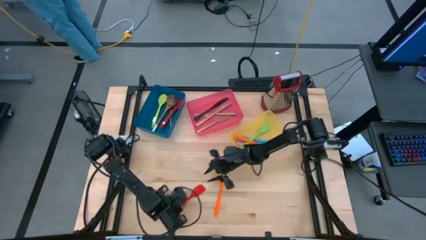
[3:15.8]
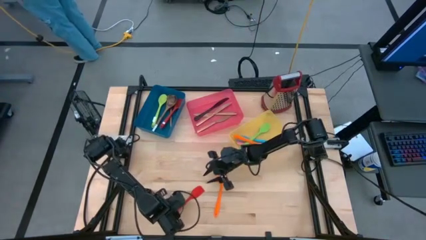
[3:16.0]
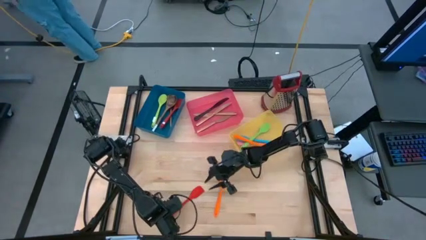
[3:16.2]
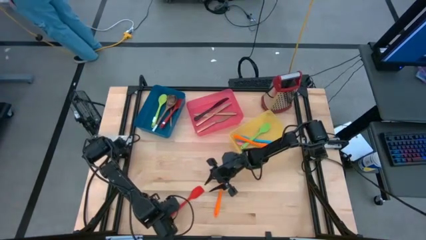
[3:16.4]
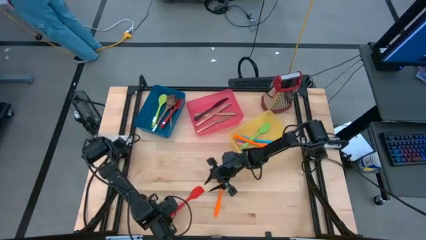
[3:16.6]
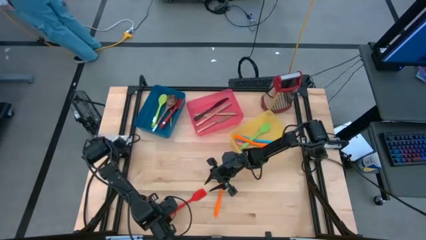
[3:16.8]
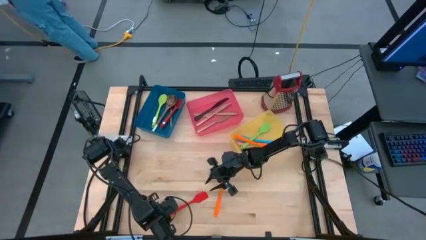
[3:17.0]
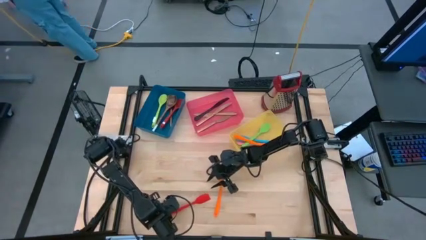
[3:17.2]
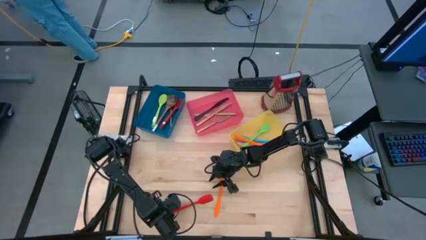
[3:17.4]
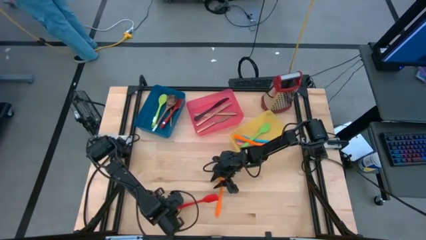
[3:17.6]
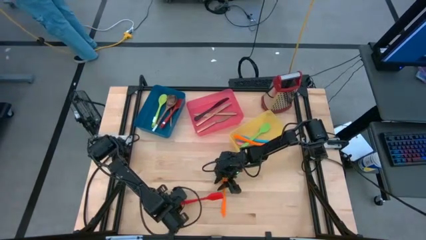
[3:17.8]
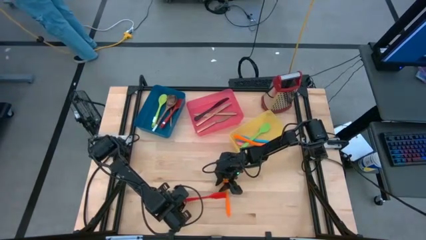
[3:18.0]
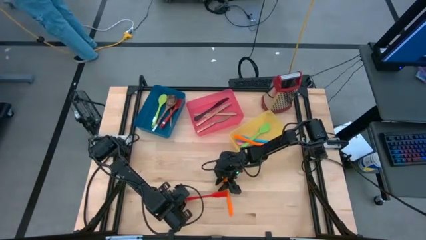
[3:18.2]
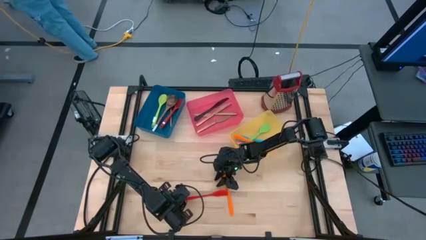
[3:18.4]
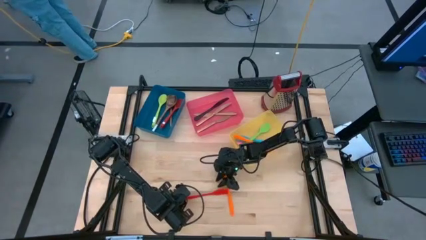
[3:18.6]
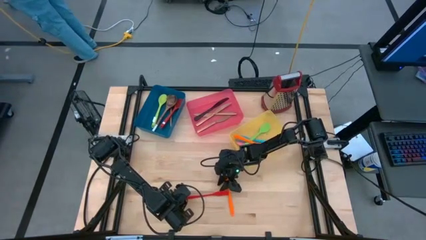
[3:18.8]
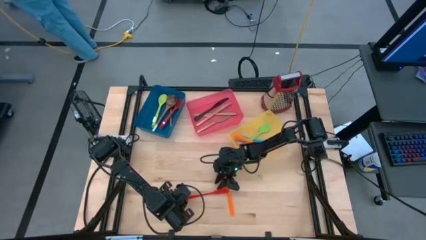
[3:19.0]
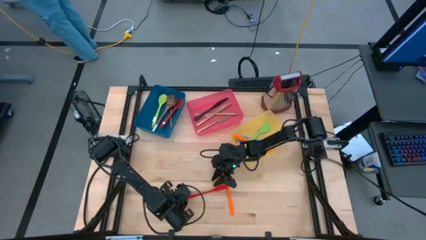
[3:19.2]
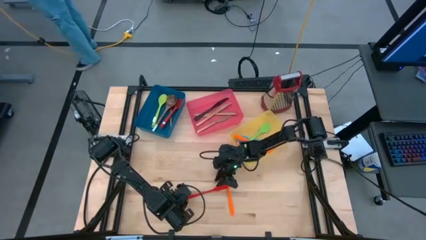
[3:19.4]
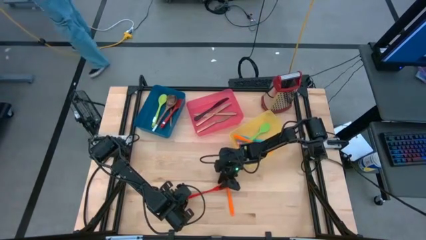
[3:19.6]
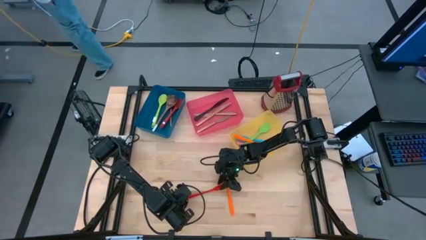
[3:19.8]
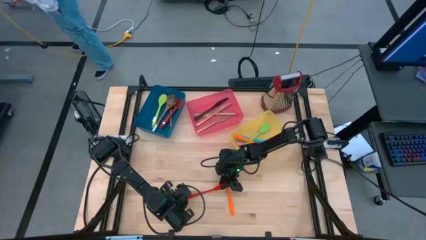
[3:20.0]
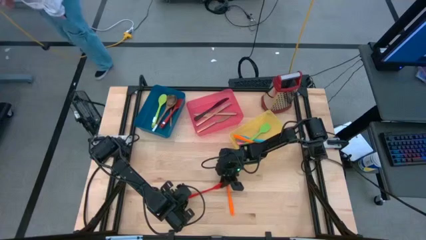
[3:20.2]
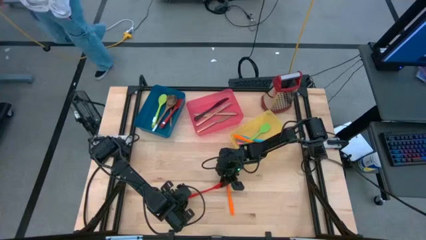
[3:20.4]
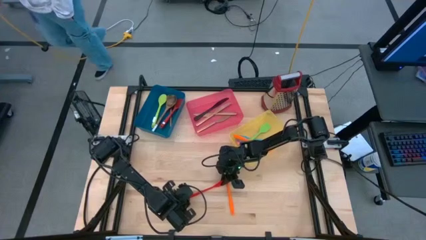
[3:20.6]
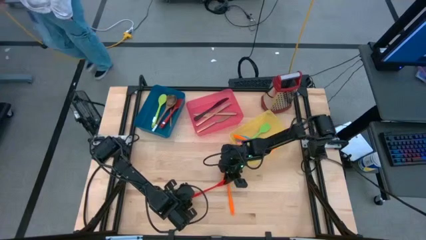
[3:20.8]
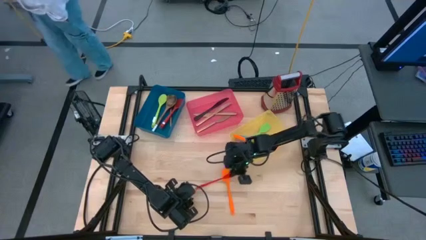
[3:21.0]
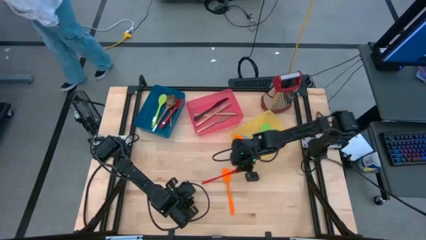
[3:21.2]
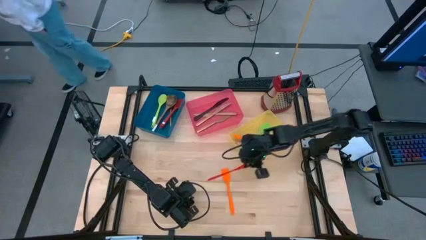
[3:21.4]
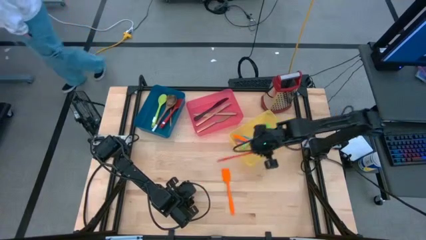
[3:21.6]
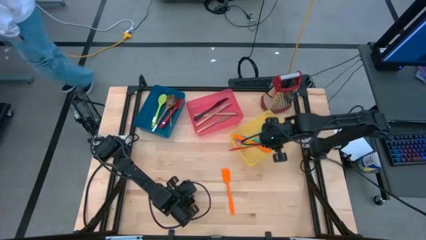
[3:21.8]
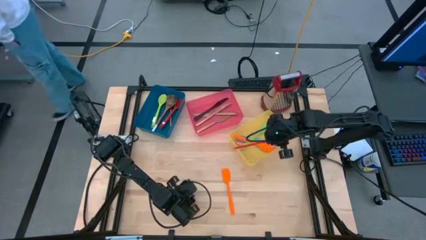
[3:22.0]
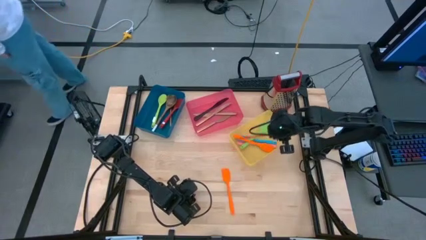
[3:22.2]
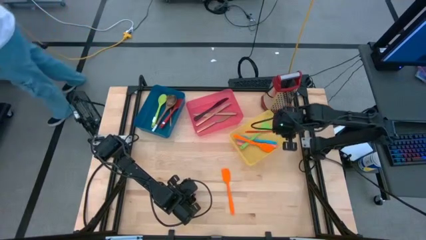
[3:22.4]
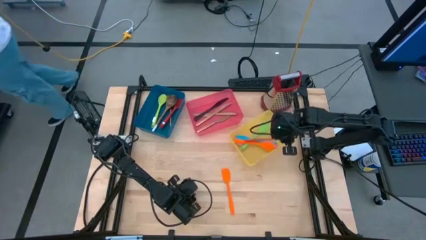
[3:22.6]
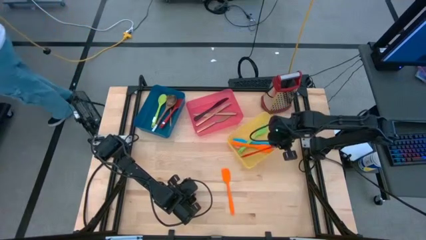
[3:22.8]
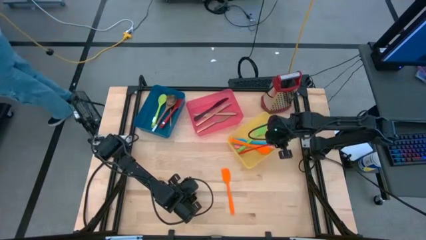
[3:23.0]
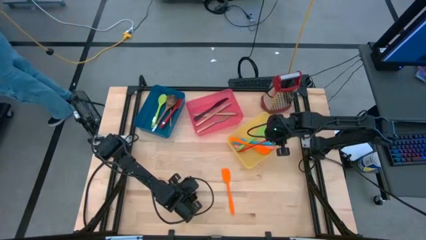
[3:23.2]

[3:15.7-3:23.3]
Task: Pick & Place Kitchen Items
Put the red spatula into the yellow bin

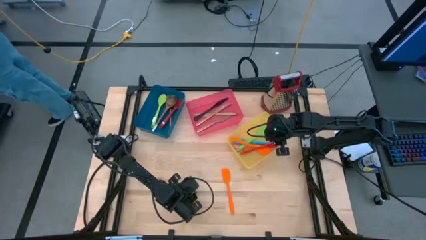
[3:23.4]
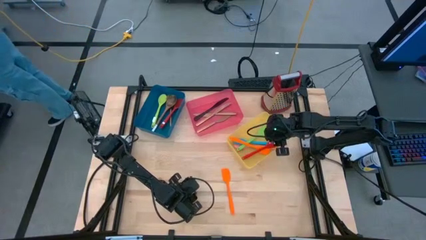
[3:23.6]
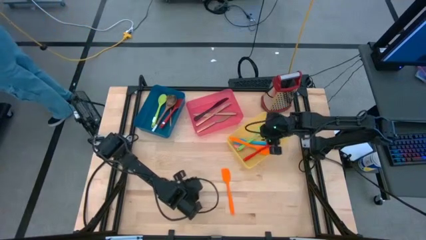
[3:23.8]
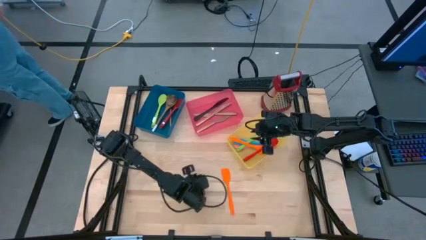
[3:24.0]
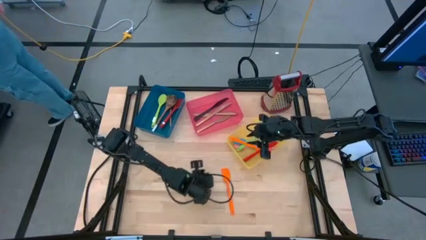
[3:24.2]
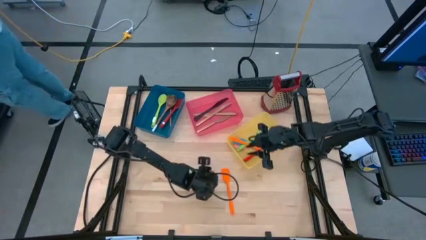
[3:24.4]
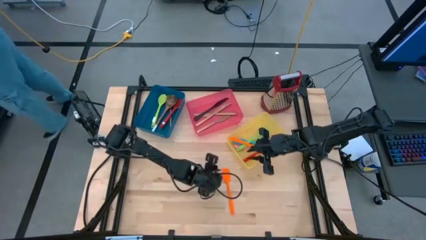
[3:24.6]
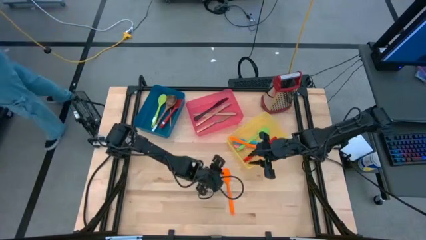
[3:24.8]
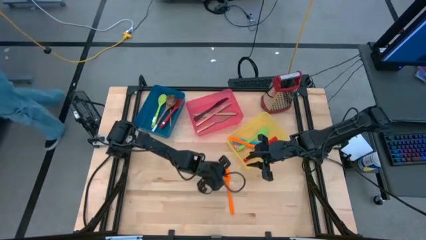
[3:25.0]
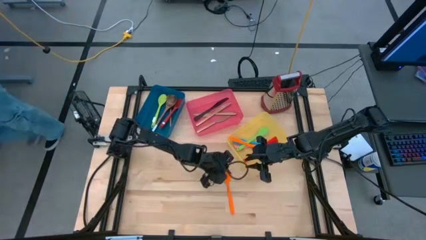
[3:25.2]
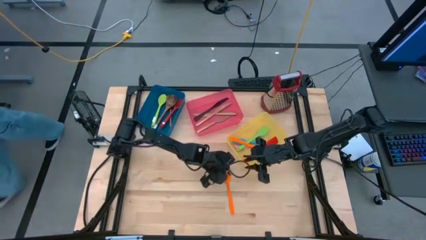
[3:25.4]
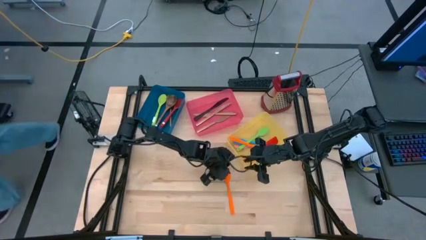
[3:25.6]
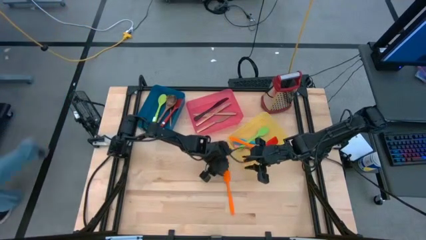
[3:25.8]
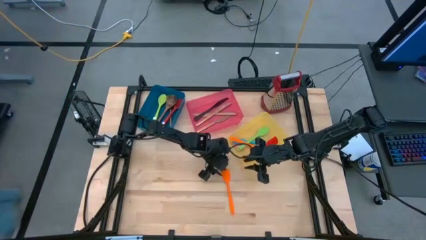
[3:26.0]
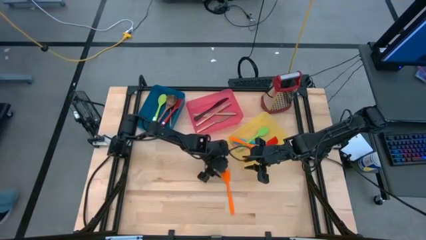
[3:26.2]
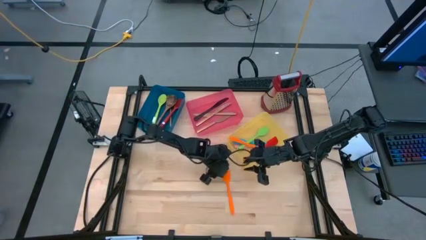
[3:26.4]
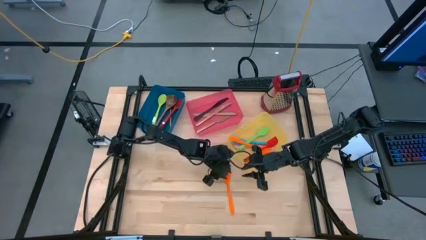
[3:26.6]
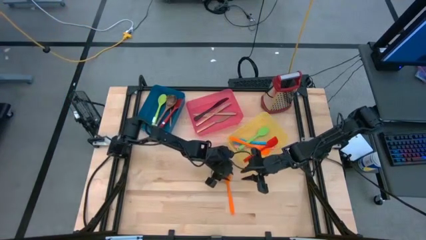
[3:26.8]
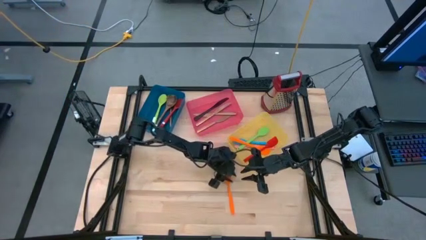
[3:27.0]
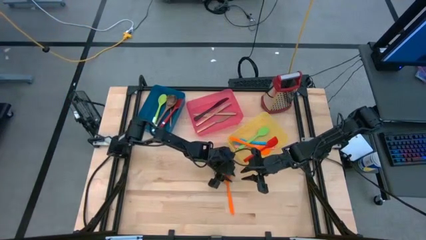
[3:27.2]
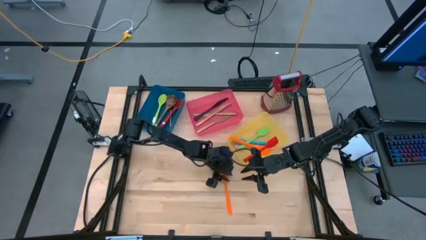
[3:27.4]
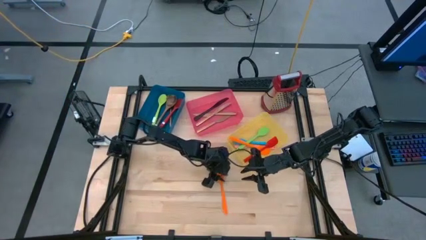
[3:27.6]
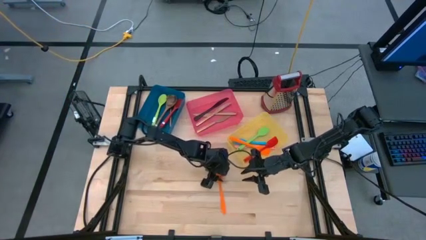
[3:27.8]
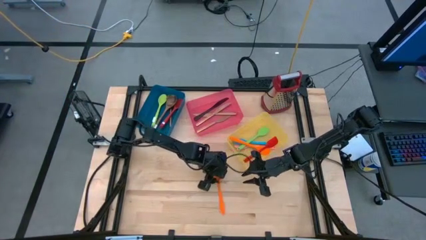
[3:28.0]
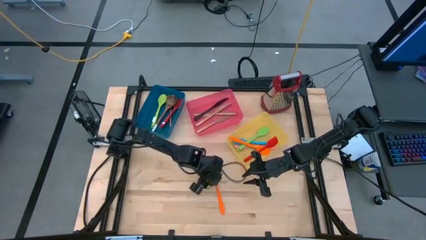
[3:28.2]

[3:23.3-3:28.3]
Move the orange spatula to the left

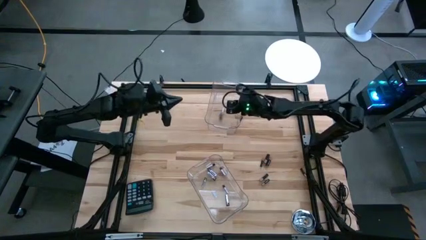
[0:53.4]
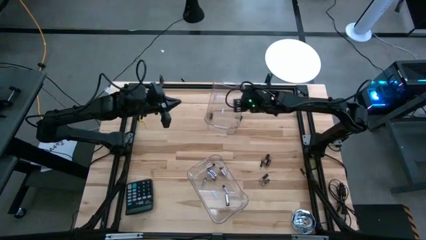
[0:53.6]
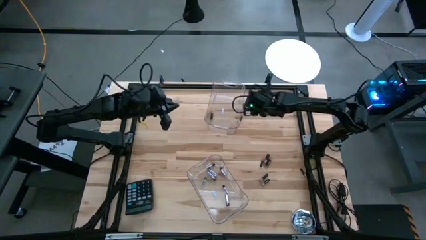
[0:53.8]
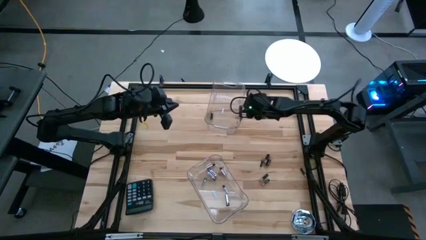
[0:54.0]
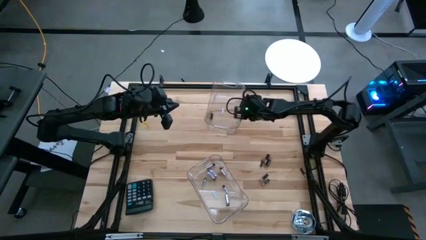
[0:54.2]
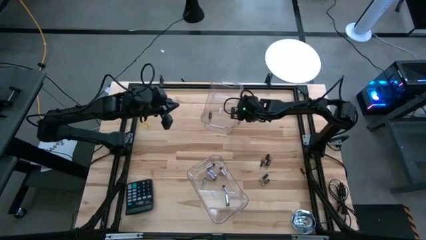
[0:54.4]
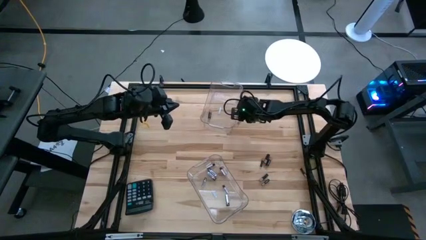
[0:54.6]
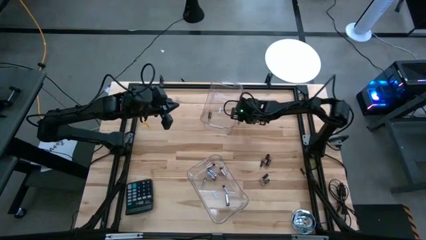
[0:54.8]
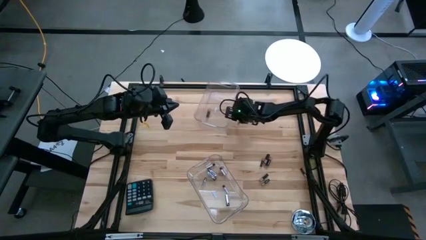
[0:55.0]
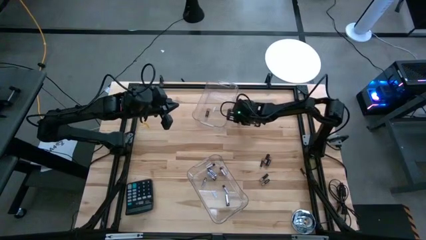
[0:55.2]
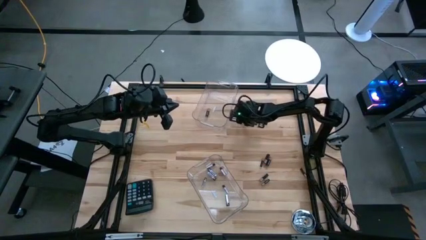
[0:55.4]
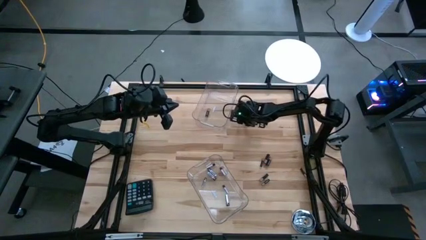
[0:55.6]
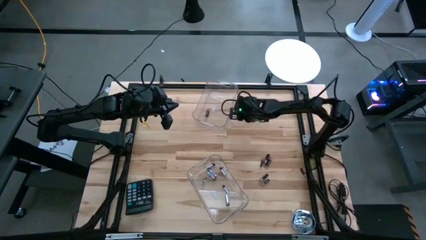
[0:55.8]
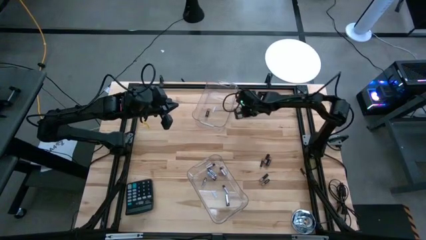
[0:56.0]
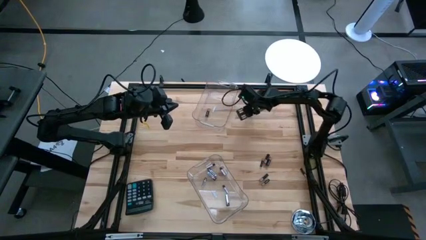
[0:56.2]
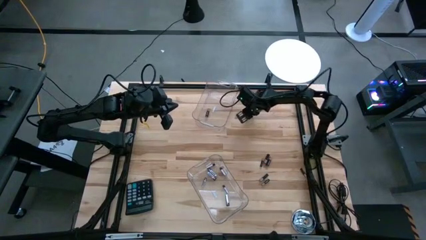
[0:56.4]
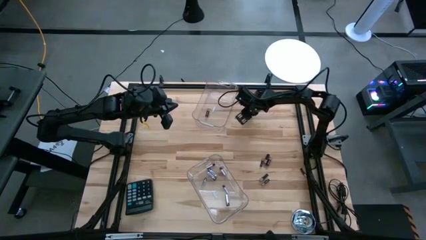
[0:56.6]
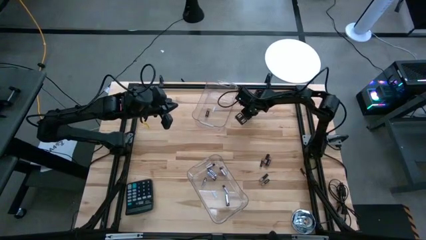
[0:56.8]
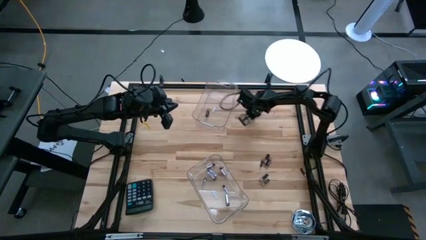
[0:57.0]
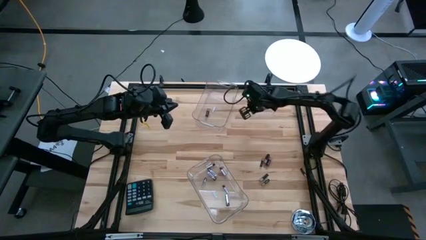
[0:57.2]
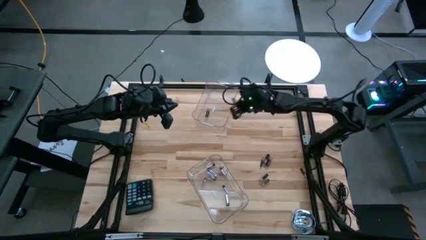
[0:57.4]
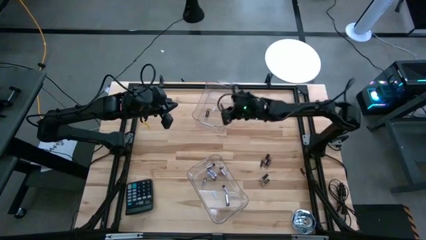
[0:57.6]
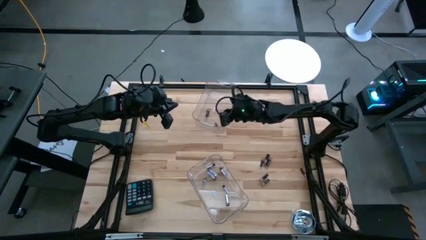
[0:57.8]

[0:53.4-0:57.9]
Task: Sort batteries
Put the black battery into the top transparent bin
